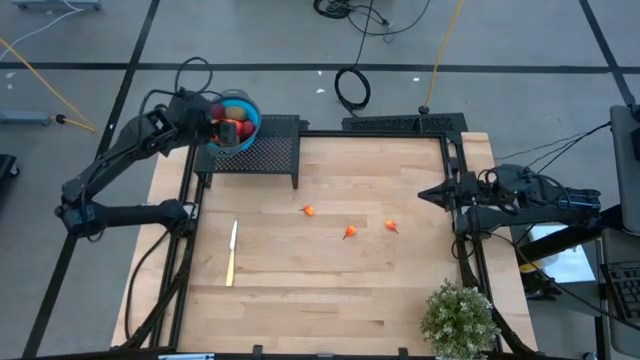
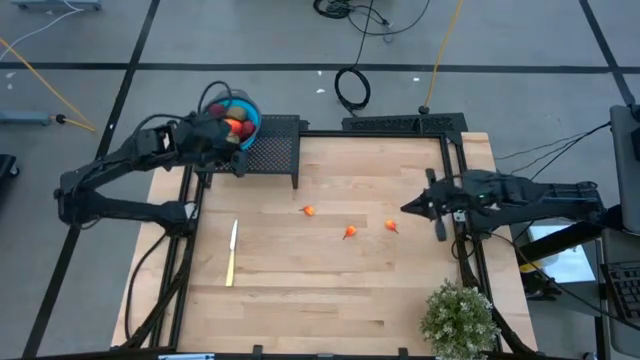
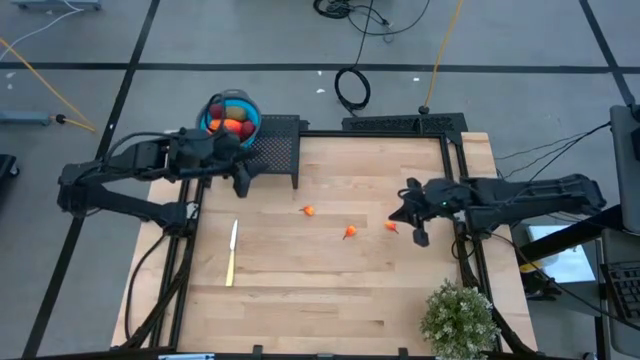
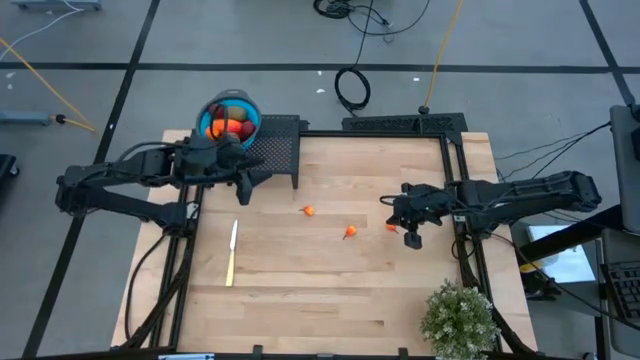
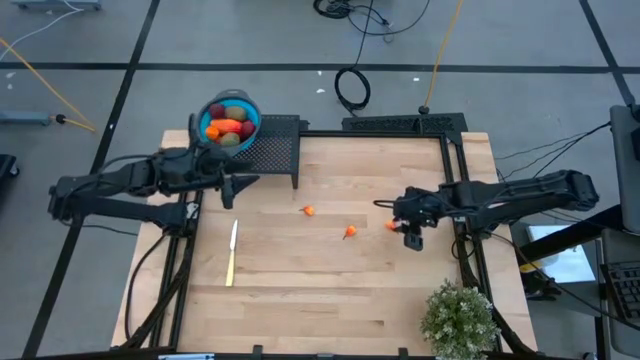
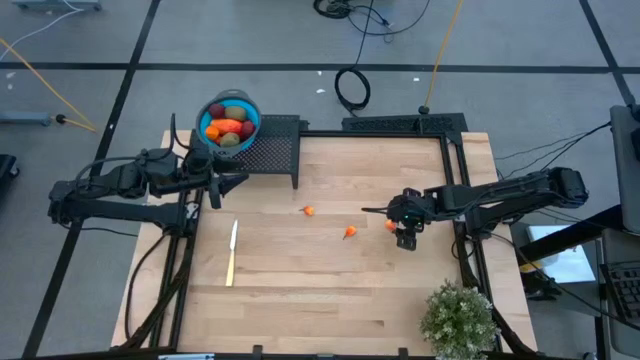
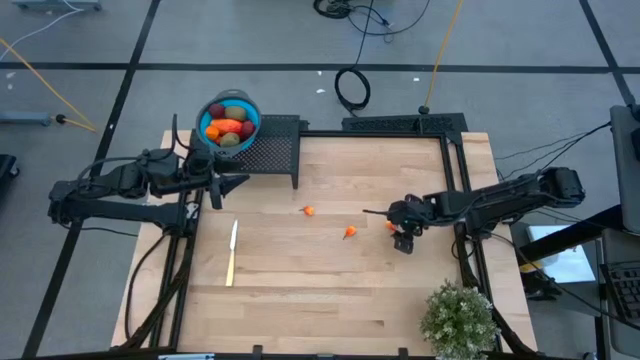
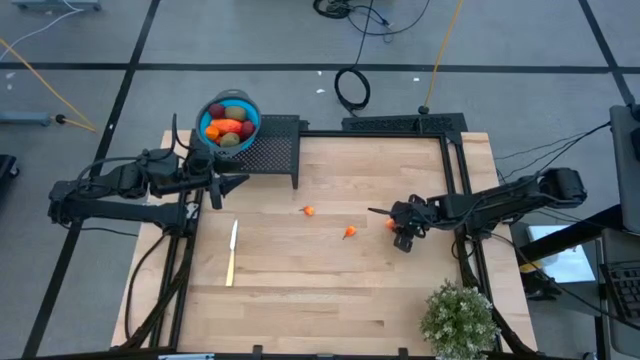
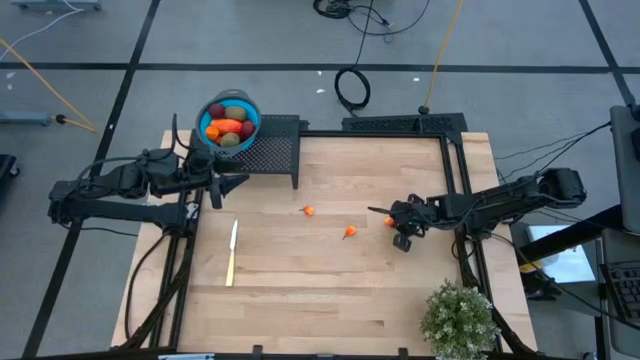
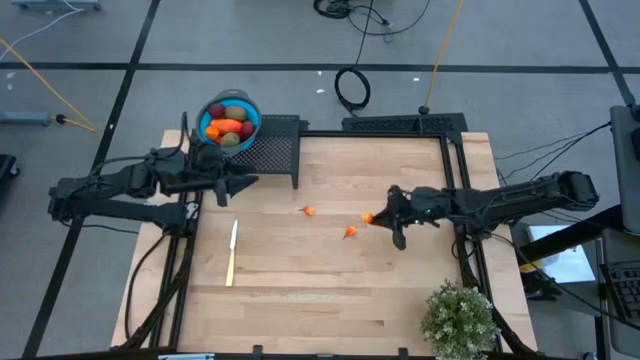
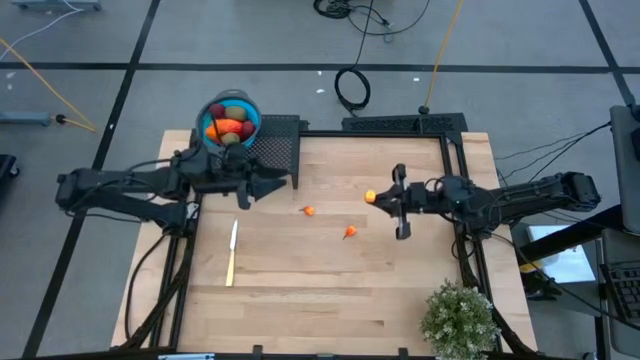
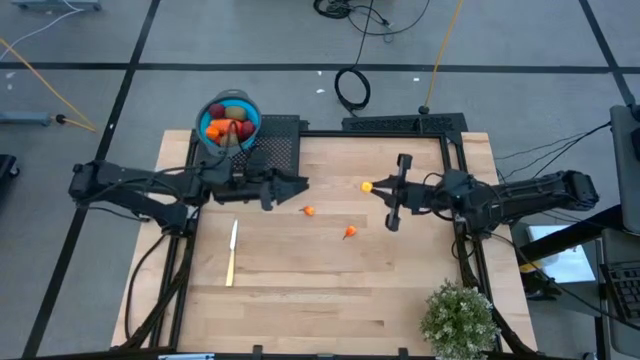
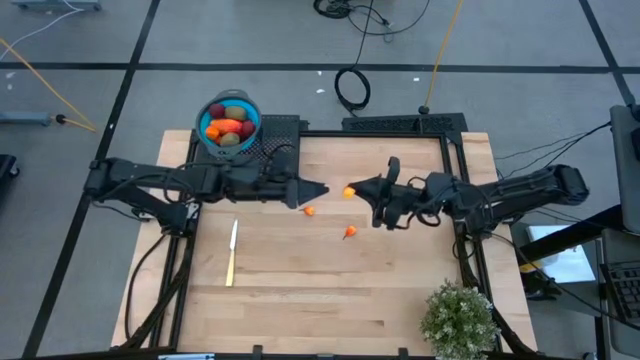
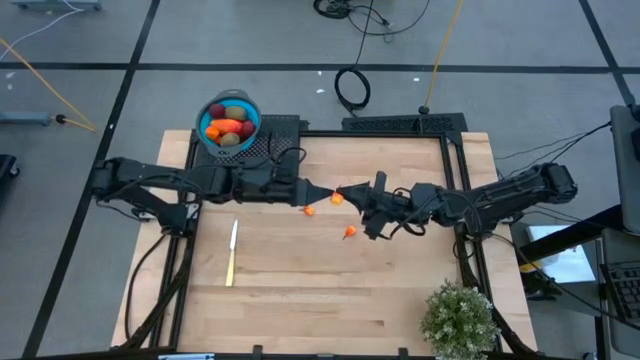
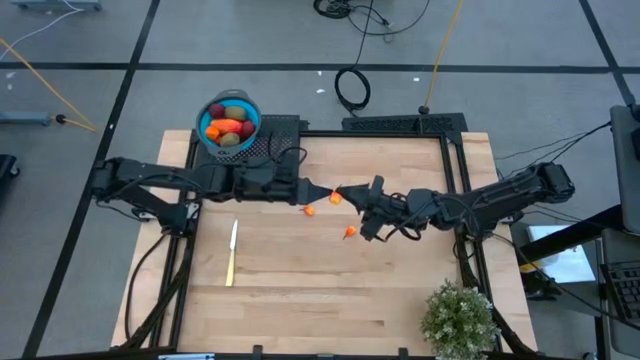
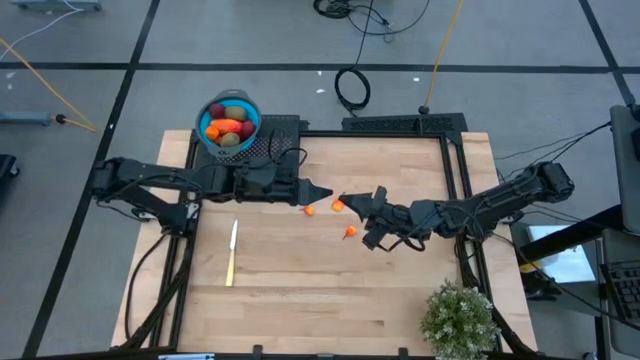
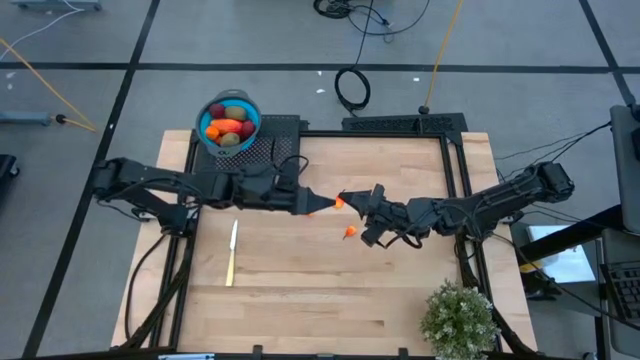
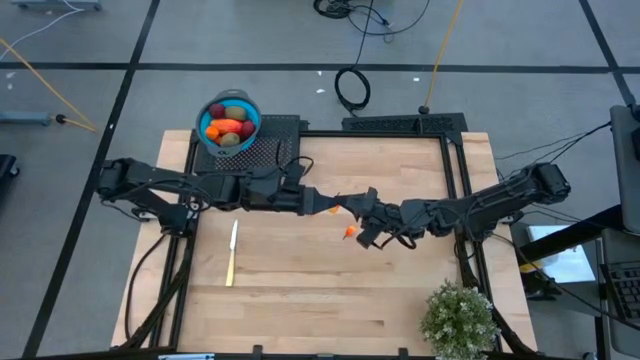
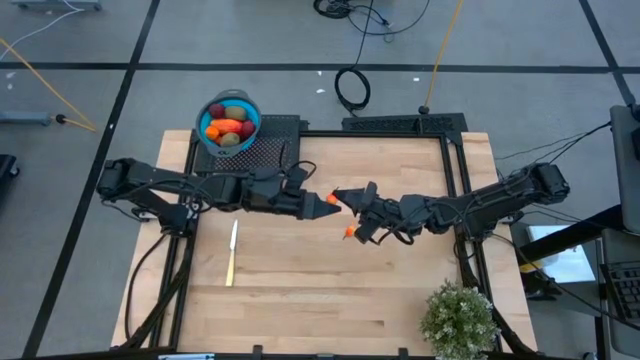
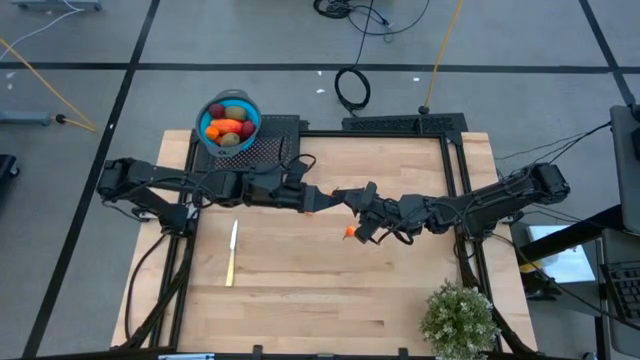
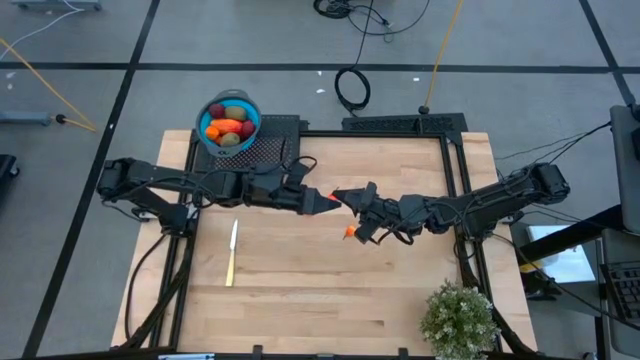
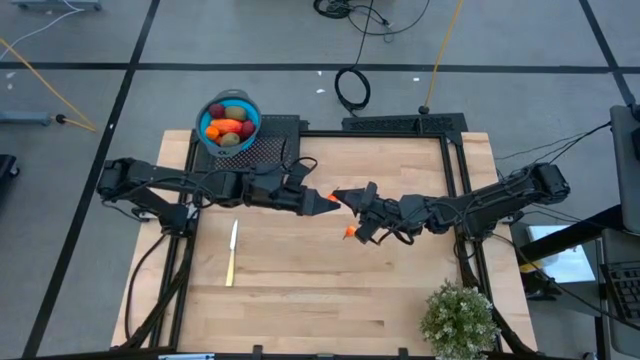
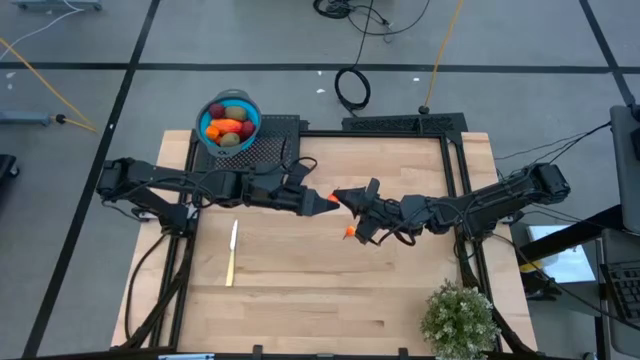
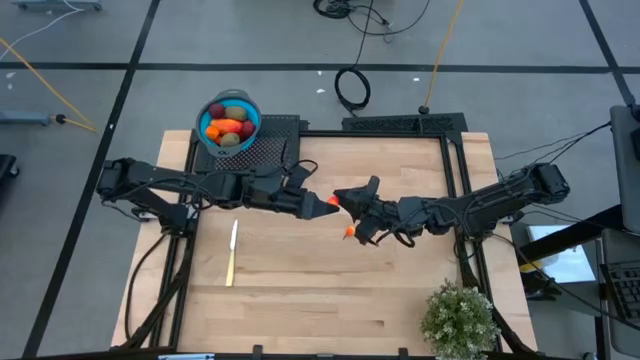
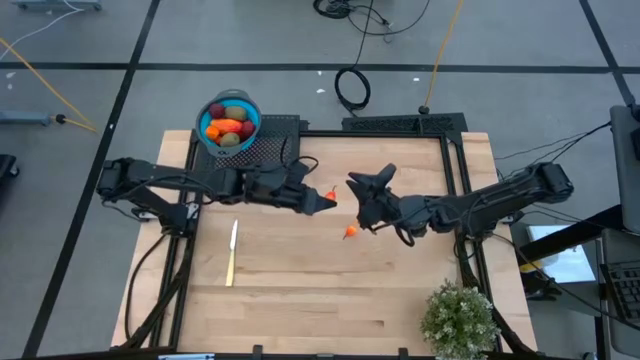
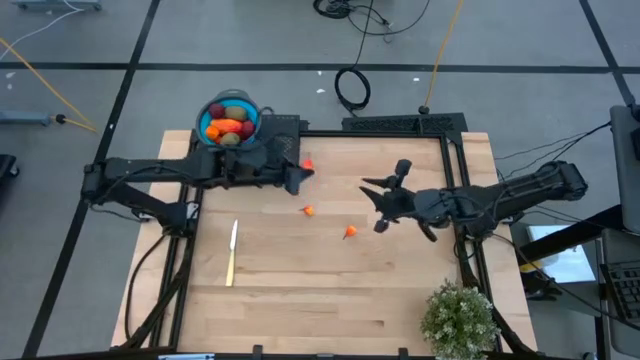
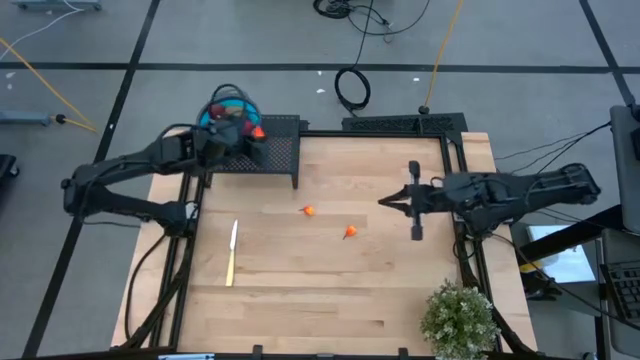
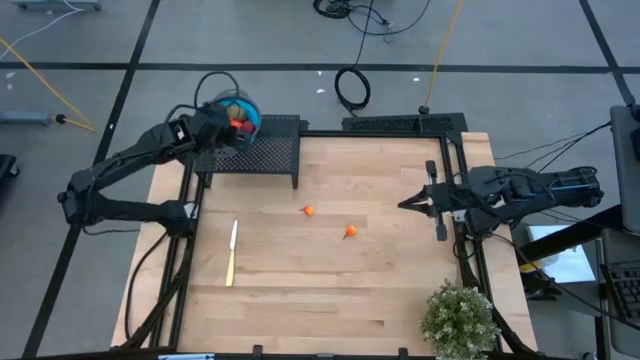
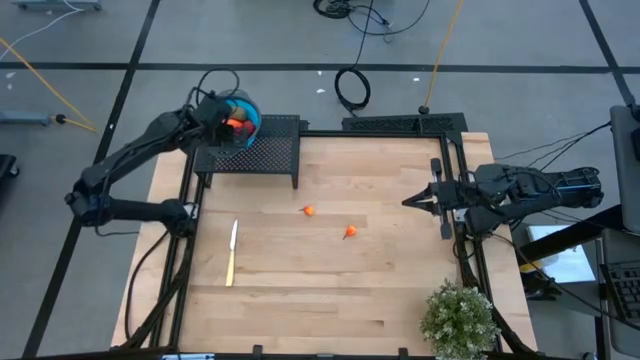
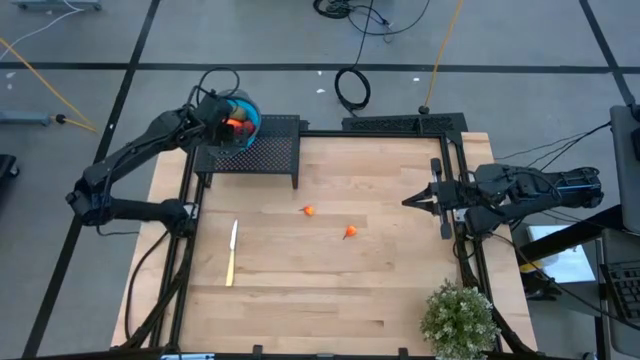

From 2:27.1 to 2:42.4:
Task: Pick & Place Fruit
Put the pear into the blue strainer bowl on the shelf
